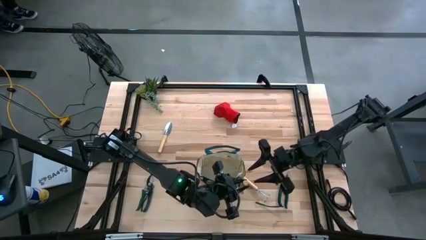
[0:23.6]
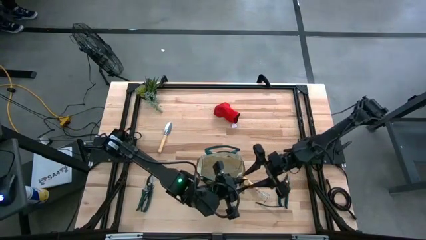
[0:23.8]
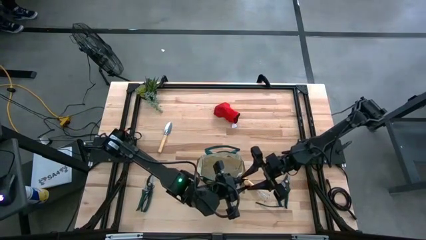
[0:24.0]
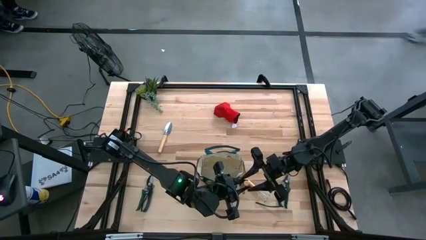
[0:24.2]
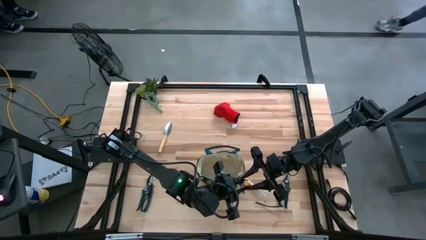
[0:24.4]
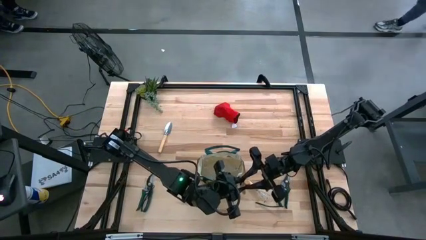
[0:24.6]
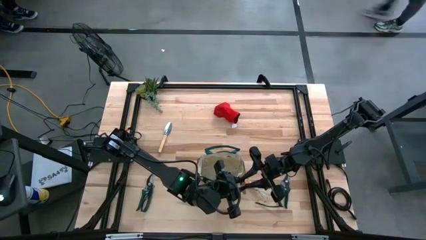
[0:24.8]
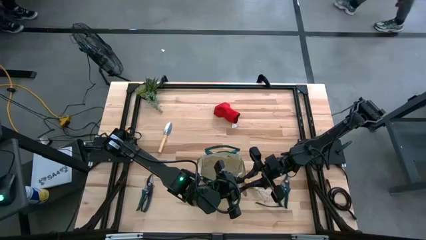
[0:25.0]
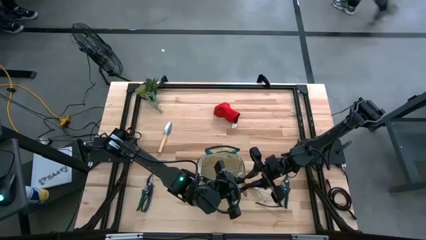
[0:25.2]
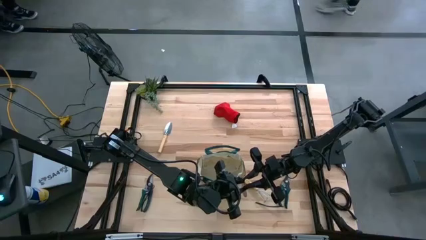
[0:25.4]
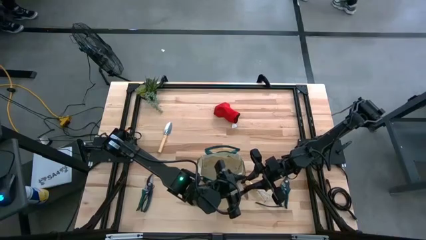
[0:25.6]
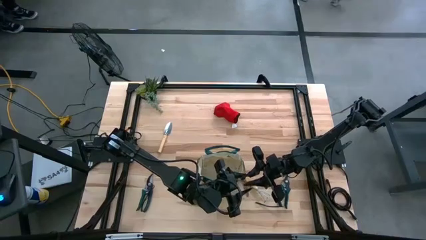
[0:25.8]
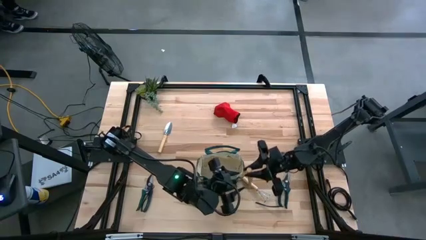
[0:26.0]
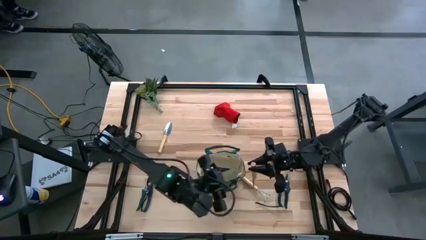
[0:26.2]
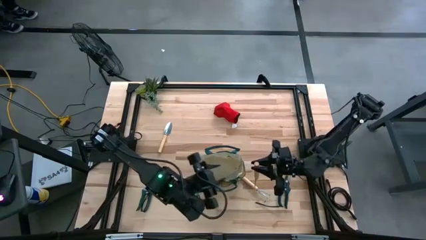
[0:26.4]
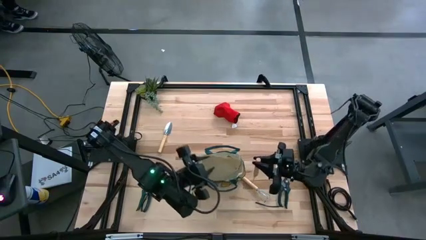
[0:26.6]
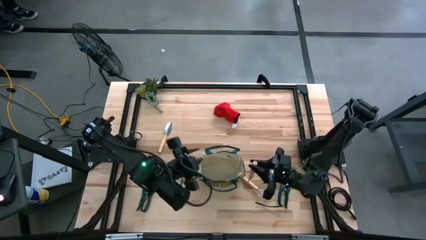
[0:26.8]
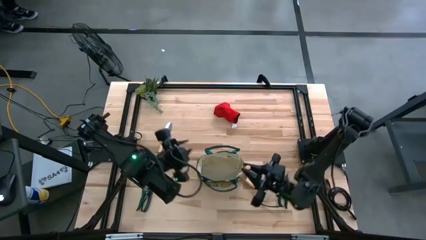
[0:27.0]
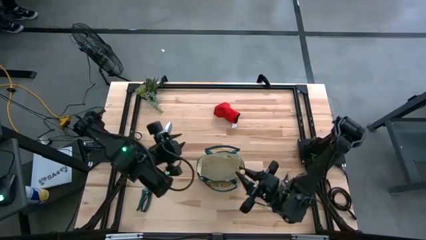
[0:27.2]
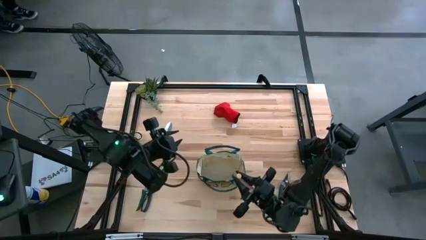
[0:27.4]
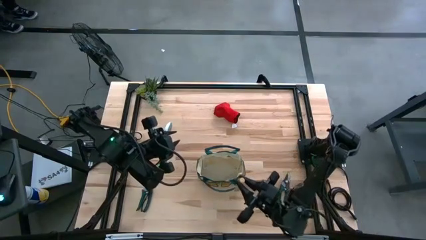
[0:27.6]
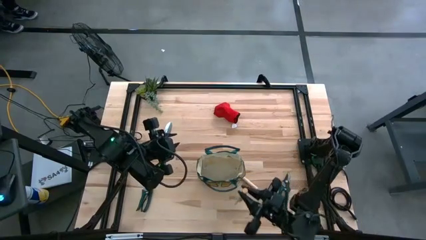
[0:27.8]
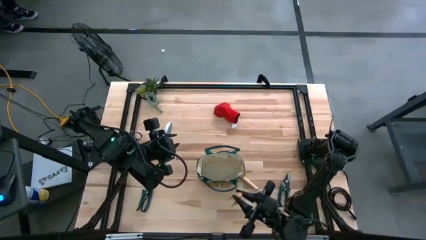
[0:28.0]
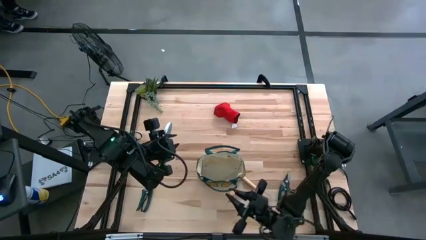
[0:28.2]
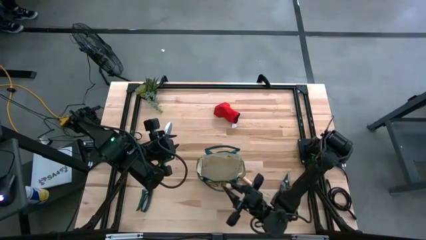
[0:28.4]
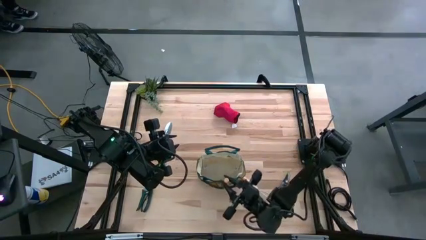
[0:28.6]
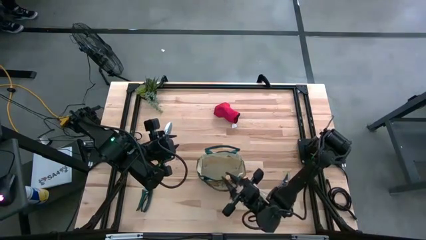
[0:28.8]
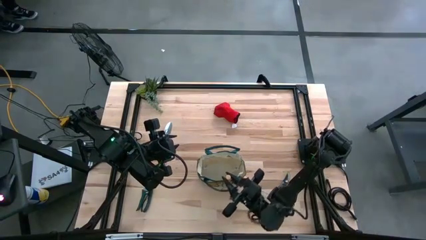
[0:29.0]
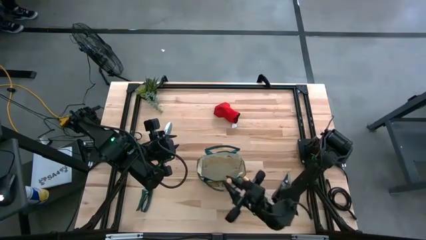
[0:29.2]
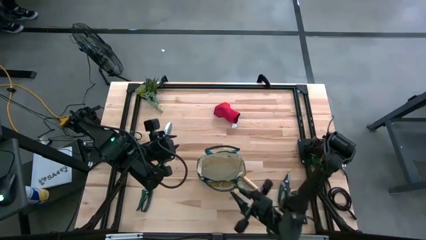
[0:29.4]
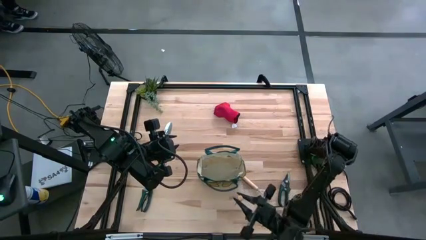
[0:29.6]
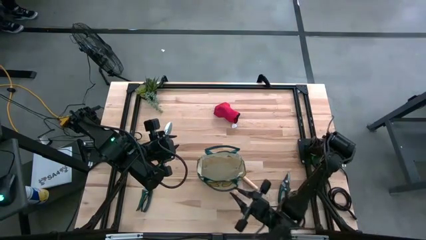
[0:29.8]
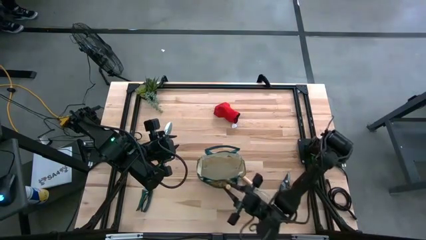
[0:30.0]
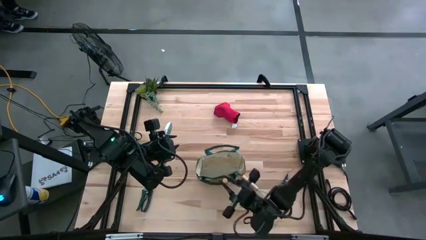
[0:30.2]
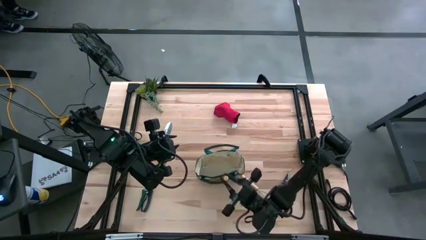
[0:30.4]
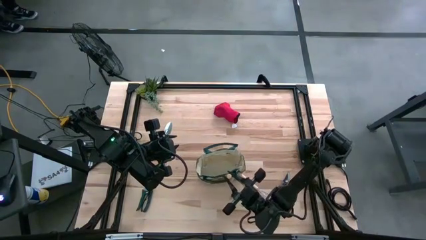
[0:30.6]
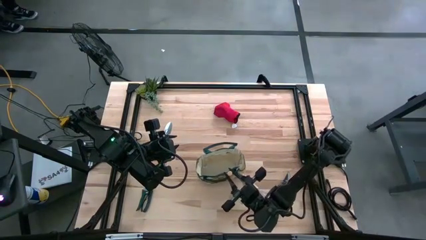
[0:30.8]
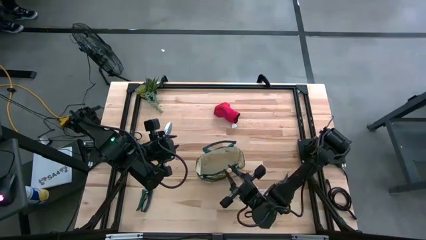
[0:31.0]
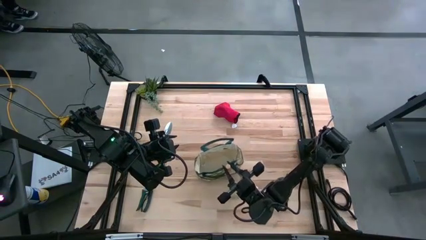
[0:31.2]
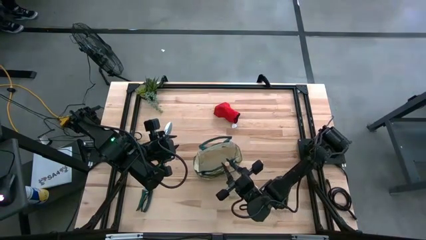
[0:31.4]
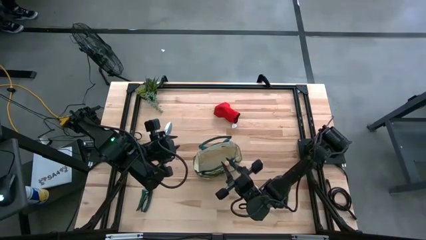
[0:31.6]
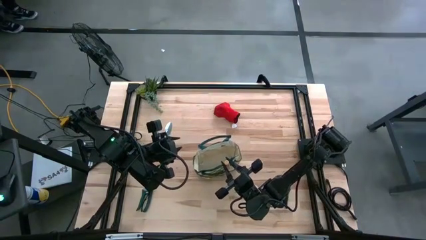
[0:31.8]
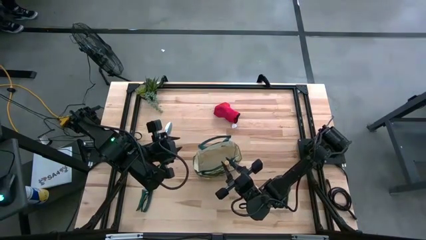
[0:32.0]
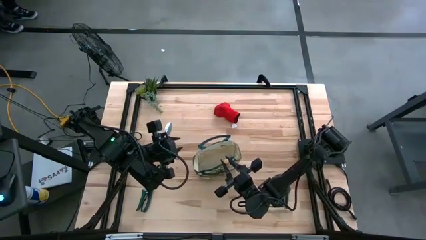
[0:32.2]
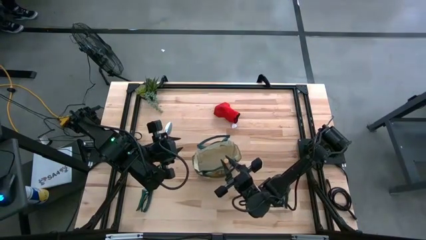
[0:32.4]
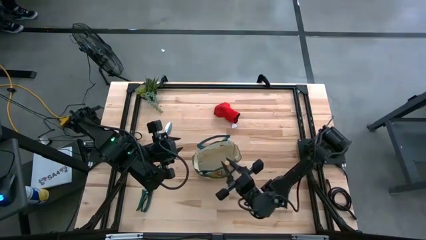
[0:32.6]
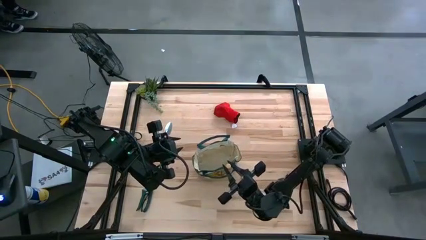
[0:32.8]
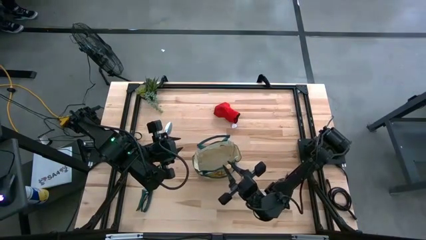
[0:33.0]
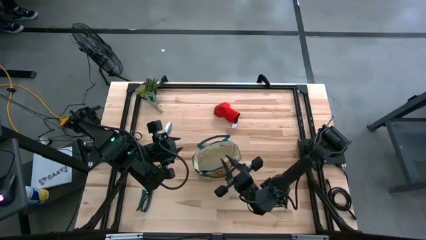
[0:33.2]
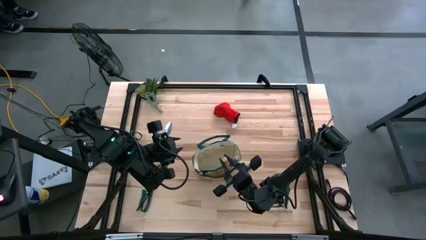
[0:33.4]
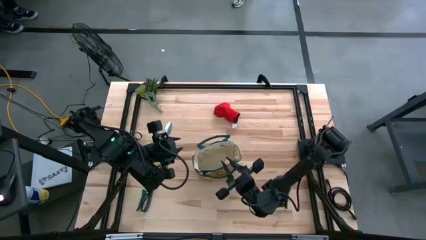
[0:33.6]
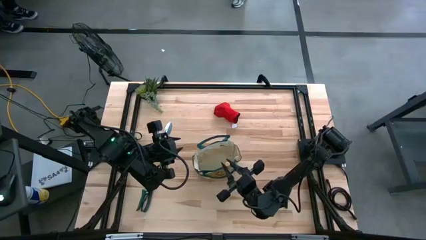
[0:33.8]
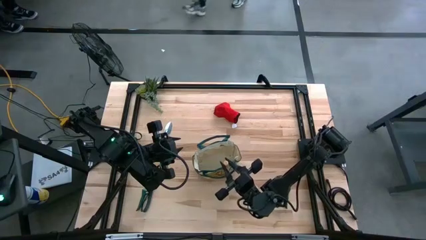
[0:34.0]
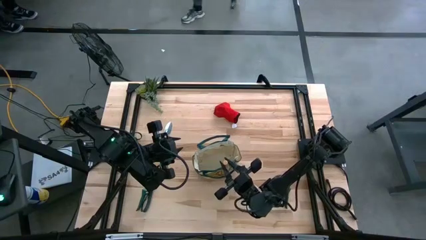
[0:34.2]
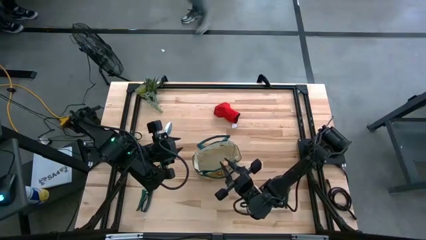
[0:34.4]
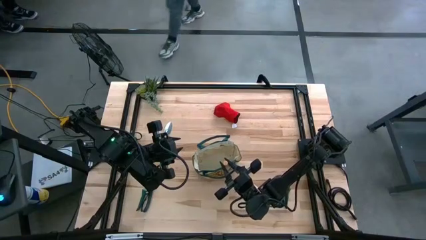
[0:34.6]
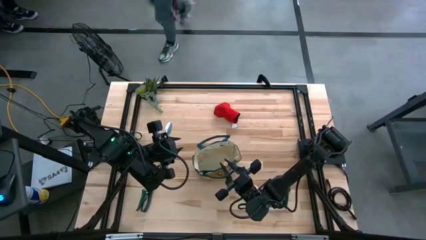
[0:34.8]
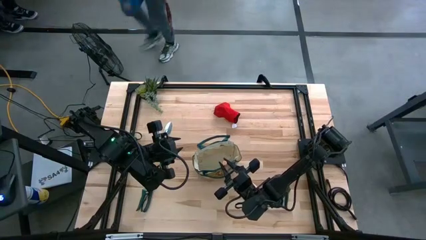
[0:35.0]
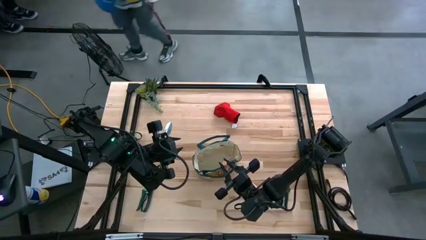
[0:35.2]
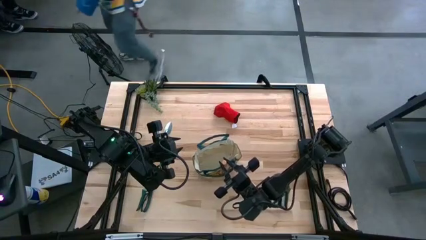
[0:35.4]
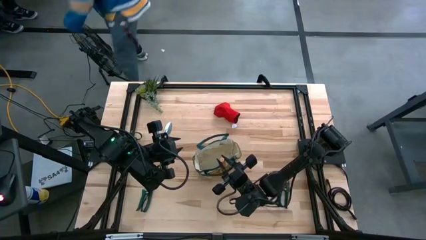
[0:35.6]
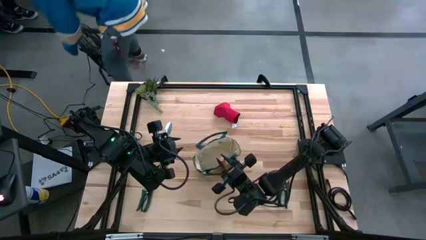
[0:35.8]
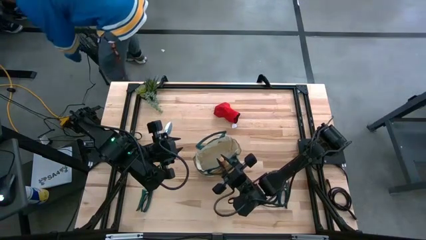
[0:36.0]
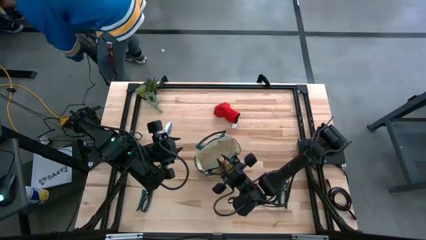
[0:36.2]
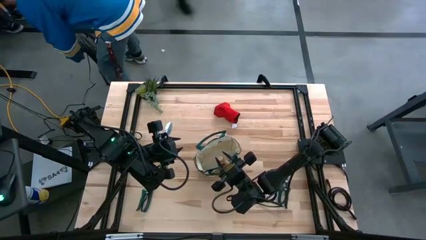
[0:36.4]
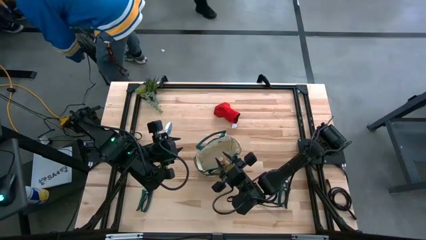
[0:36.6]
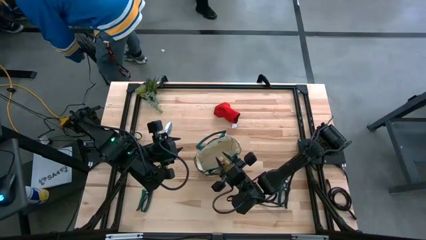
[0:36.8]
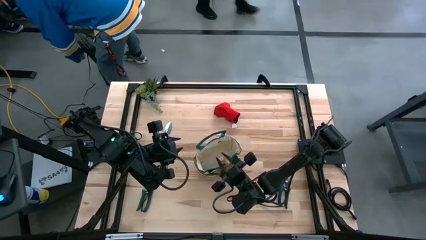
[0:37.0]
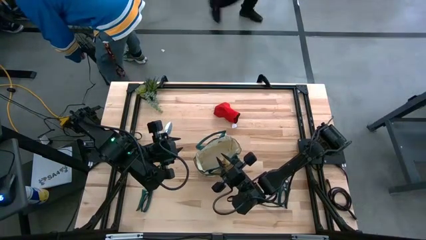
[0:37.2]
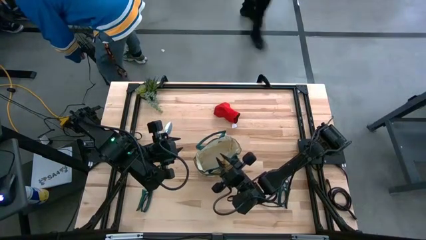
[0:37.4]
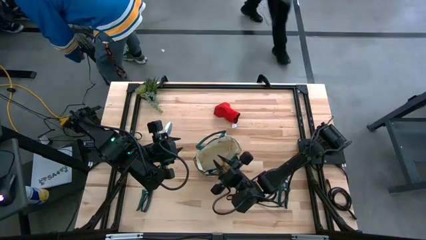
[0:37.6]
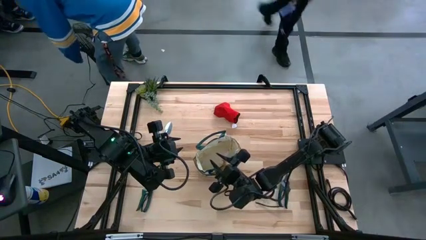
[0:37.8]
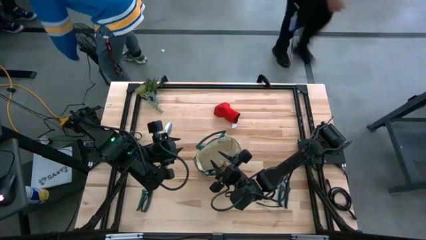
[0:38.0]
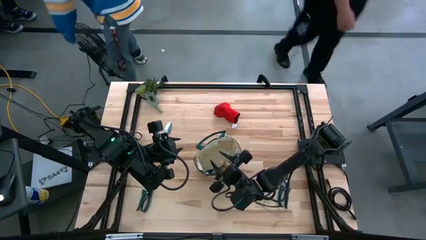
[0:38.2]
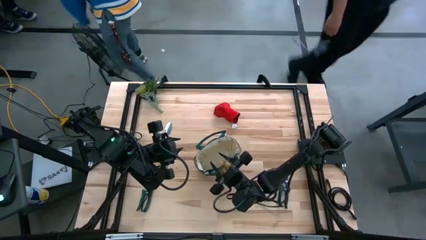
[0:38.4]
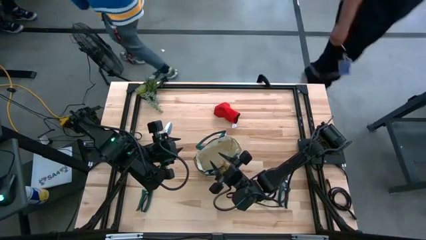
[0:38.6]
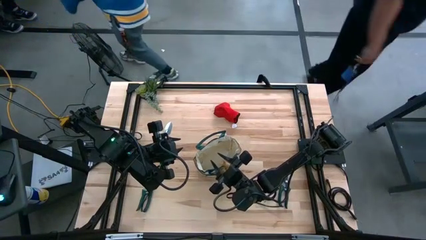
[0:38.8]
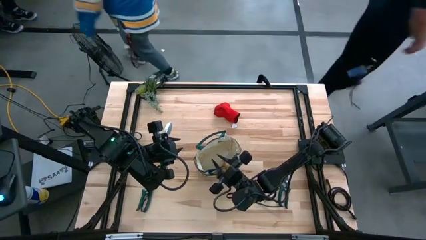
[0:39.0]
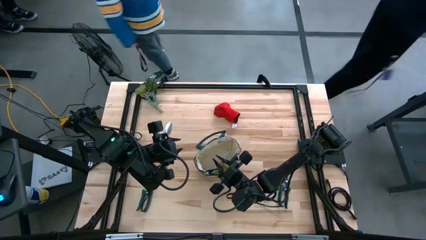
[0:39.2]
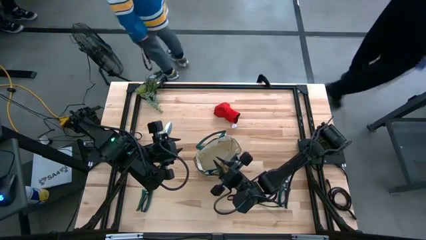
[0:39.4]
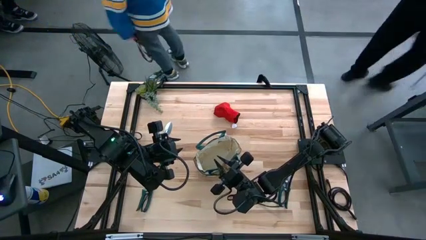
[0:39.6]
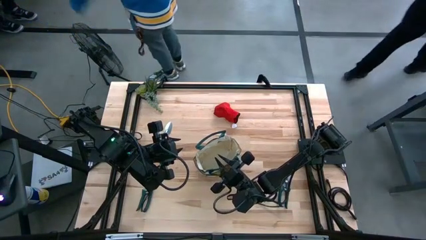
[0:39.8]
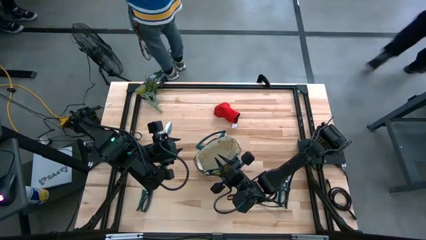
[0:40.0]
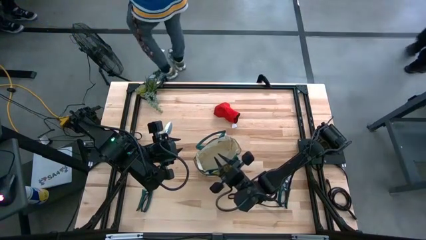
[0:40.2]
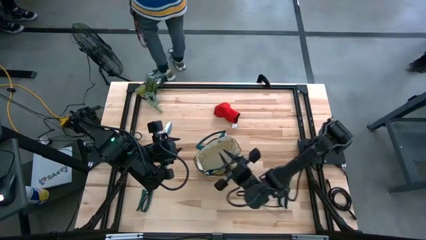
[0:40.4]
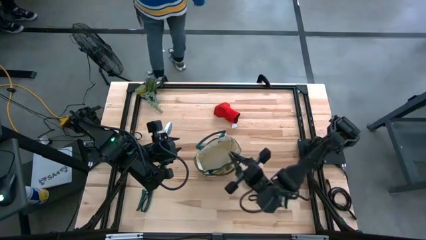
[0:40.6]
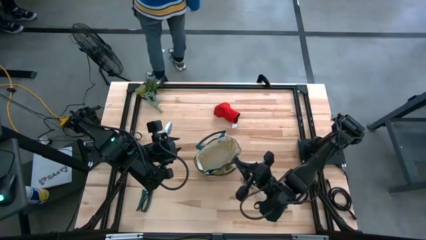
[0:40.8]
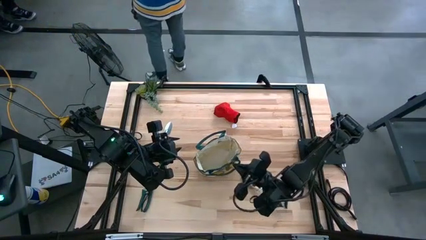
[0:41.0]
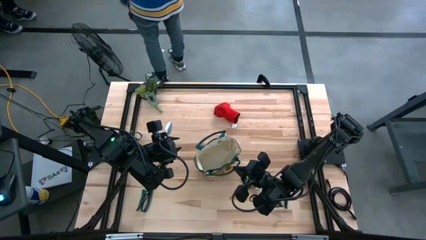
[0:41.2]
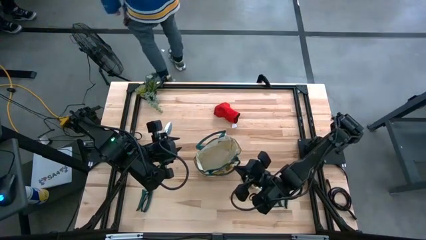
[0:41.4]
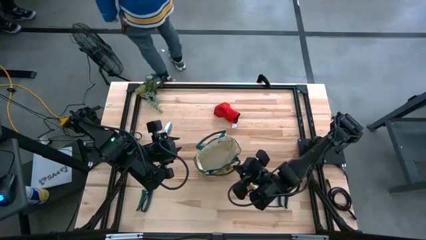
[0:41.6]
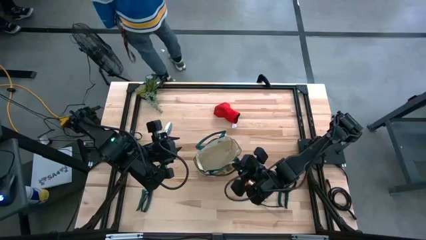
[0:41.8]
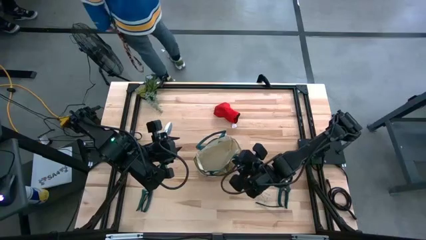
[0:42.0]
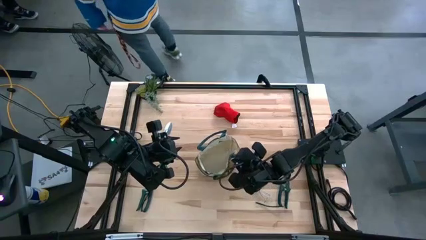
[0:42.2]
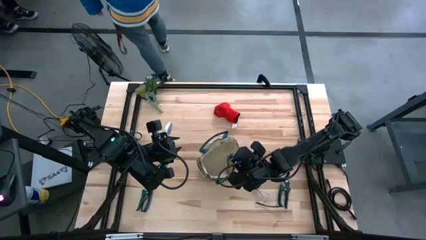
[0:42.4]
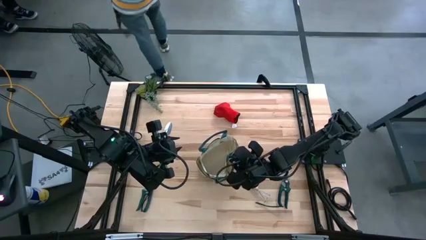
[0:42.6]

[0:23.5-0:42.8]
Task: Pick & Place Garden tools in Gardening bag
Put the brown trowel into the white gardening bag
